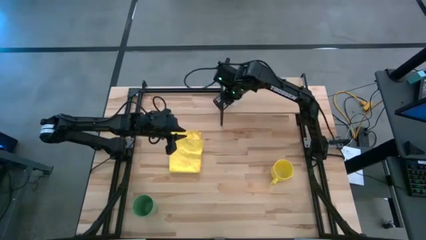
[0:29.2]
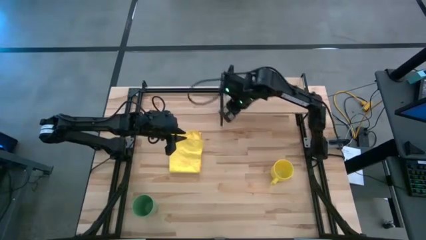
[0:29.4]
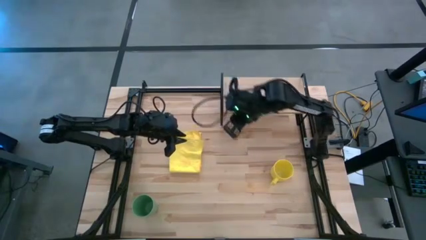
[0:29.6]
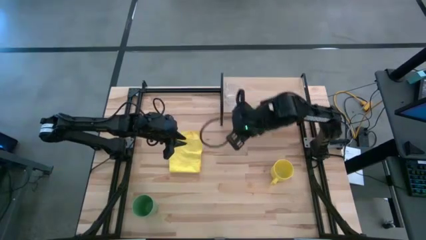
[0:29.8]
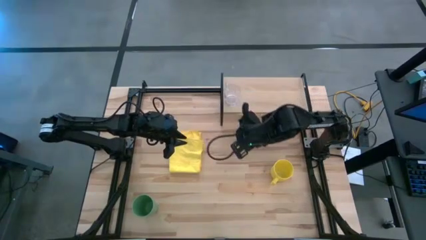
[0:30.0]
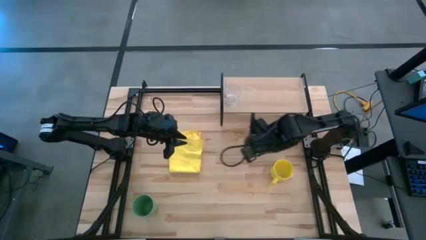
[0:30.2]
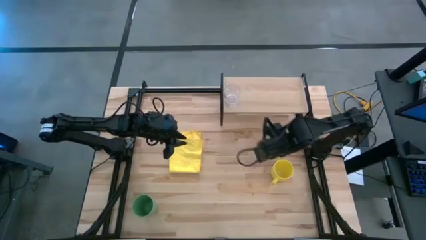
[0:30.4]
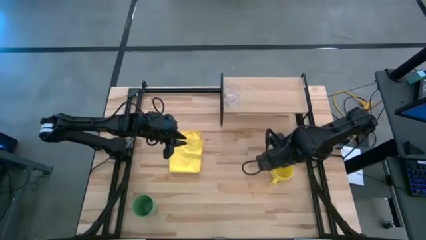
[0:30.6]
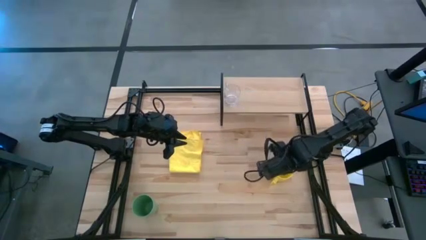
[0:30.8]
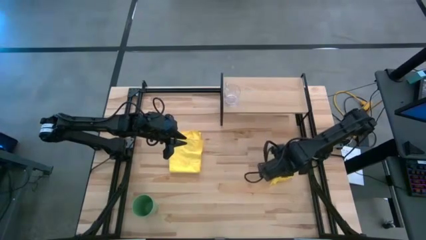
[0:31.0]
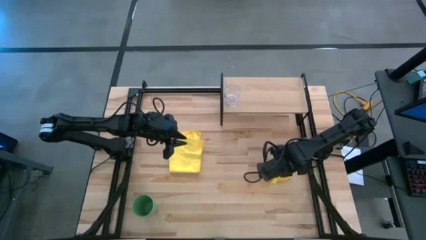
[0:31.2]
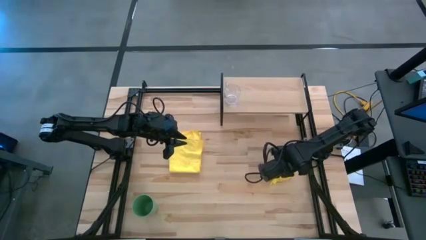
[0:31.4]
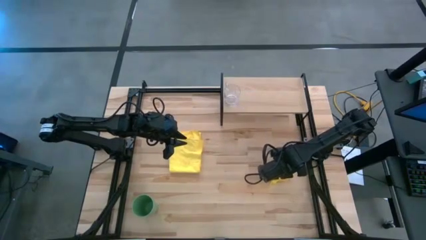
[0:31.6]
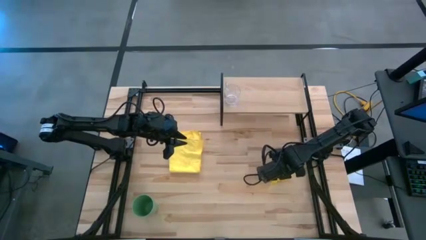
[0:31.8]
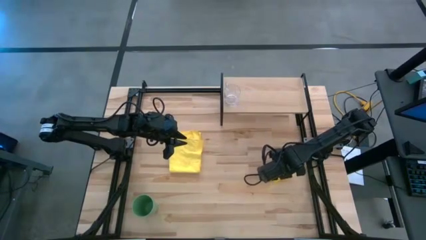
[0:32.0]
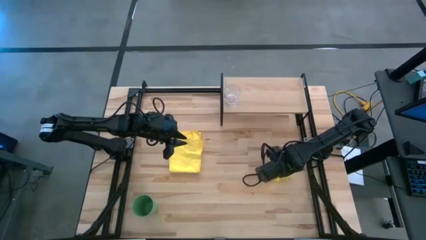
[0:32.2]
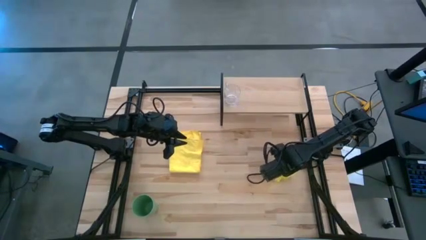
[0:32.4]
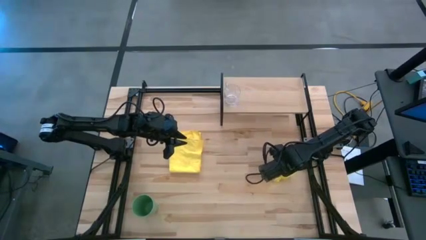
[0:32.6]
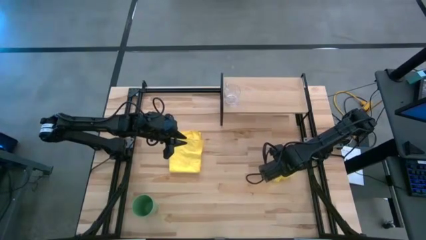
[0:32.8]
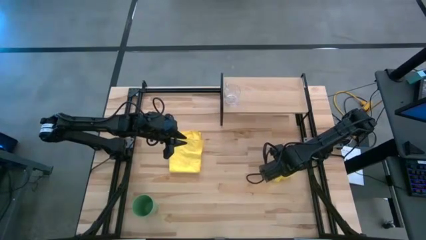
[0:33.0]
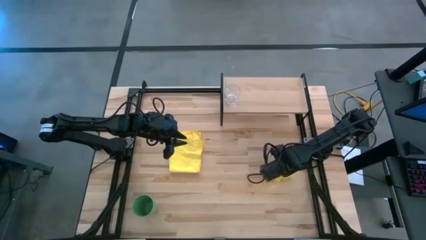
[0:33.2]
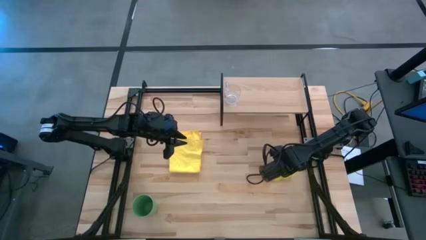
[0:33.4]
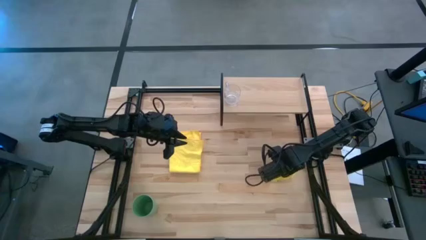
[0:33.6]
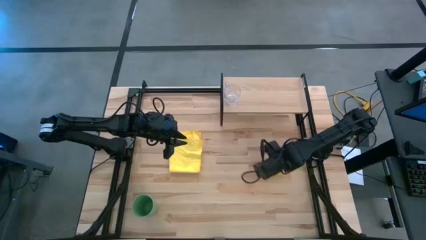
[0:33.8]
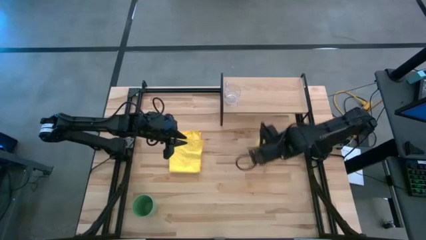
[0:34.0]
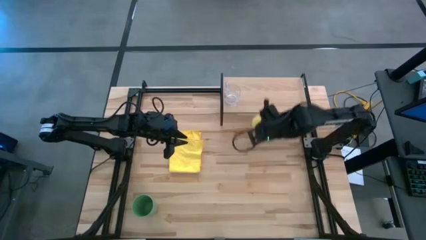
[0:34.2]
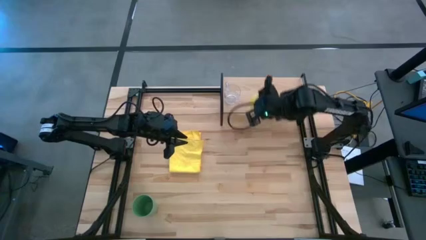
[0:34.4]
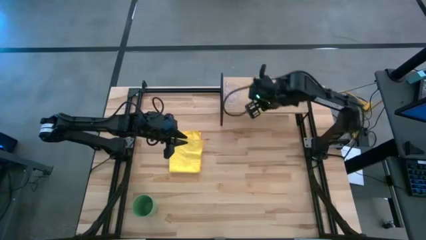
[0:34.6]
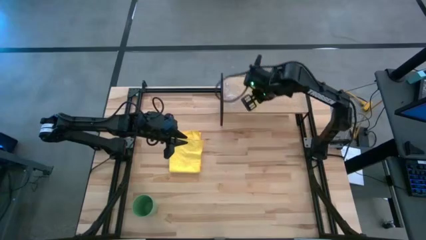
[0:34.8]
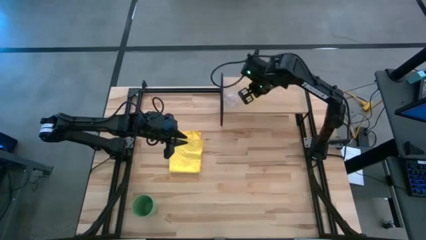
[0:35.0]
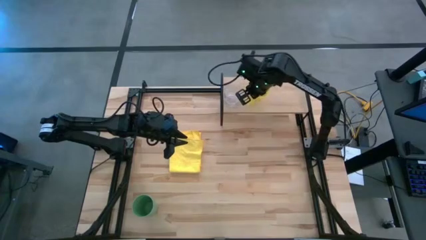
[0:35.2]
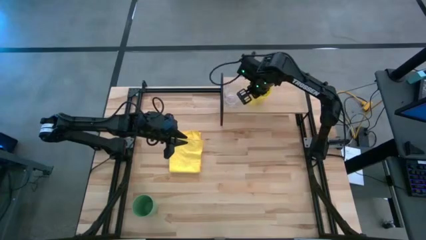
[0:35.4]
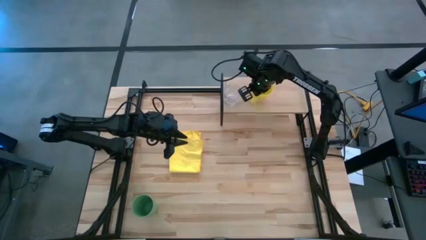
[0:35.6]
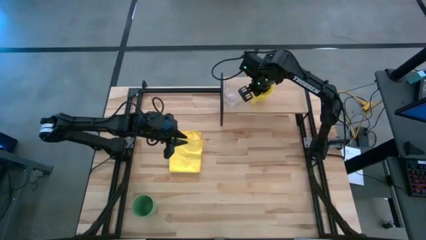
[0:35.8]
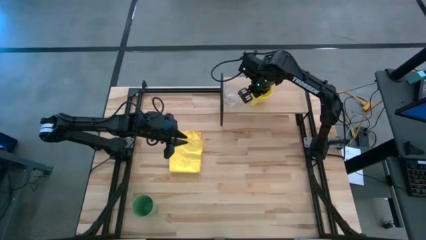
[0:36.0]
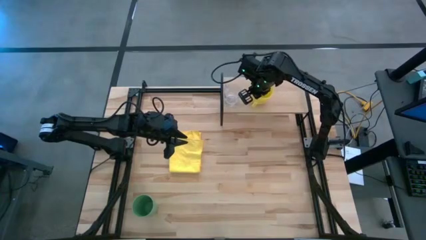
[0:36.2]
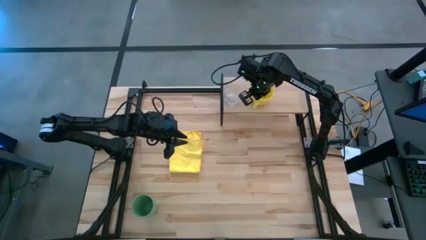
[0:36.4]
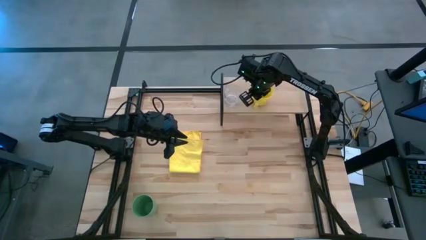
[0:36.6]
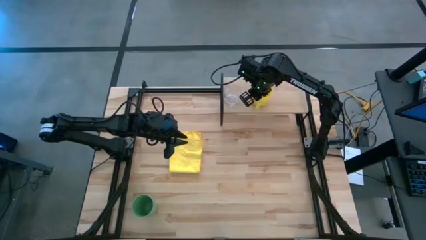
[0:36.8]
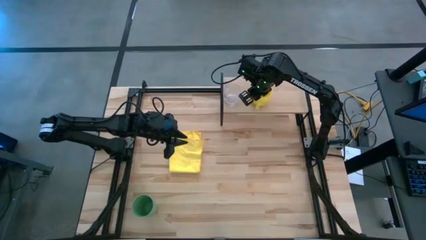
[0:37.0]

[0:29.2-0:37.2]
Task: Stack small to large cups/mugs on shelf
Put the yellow mug on the shelf

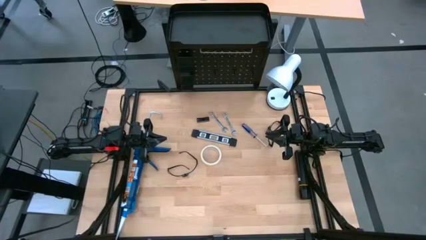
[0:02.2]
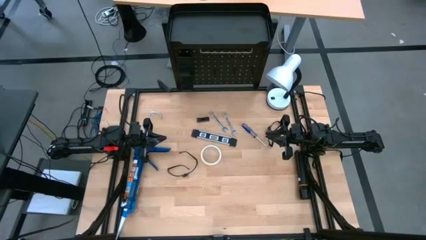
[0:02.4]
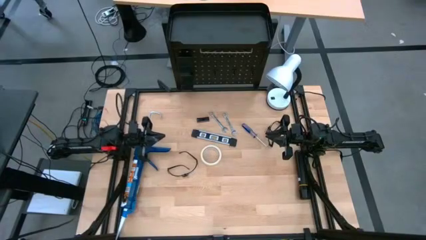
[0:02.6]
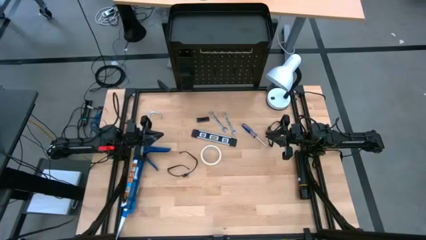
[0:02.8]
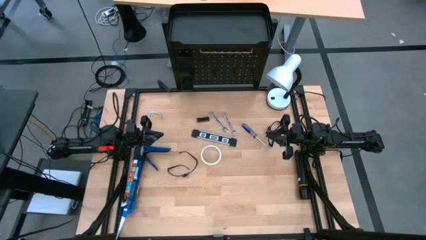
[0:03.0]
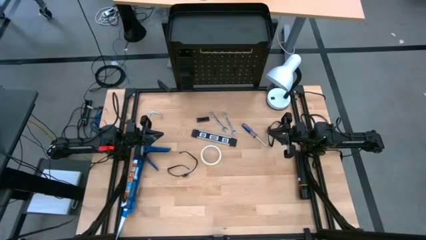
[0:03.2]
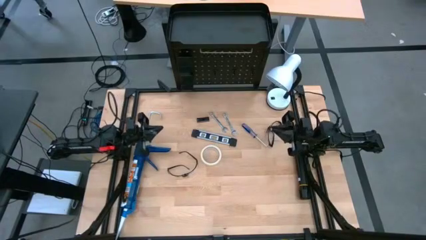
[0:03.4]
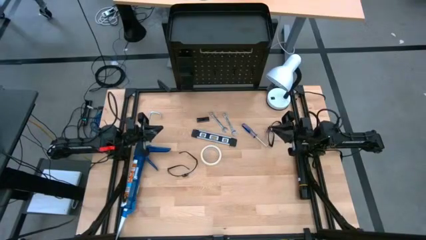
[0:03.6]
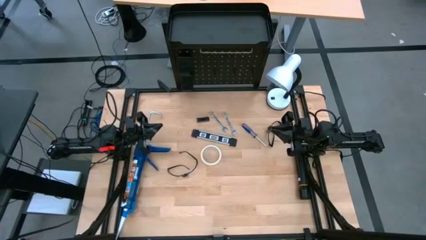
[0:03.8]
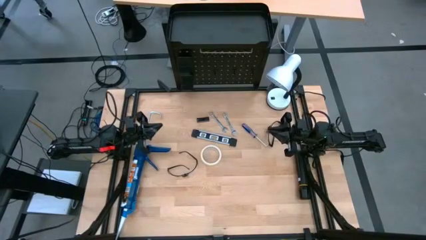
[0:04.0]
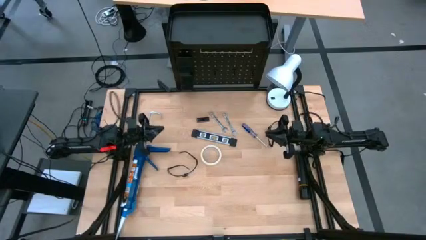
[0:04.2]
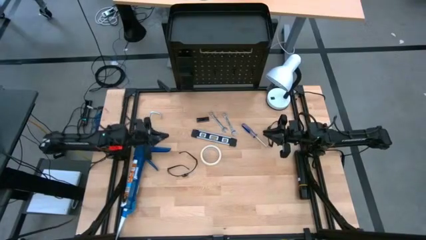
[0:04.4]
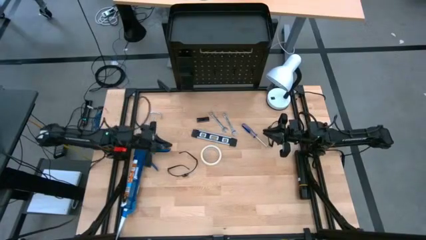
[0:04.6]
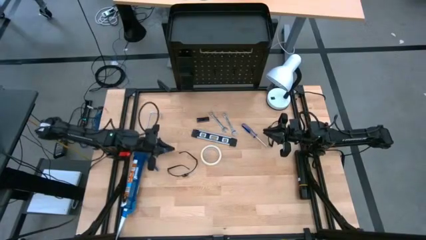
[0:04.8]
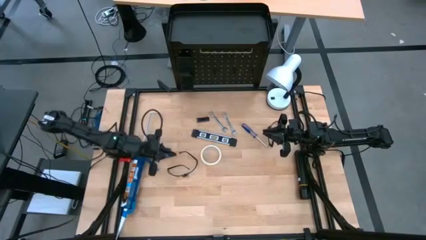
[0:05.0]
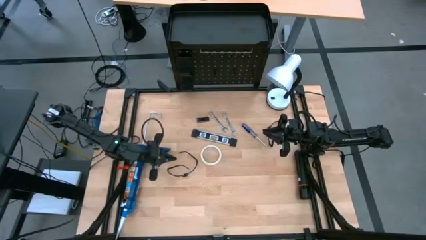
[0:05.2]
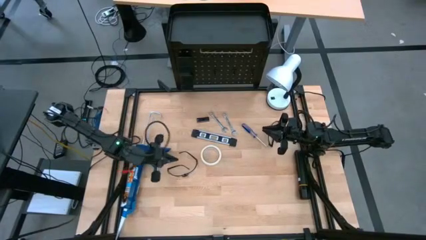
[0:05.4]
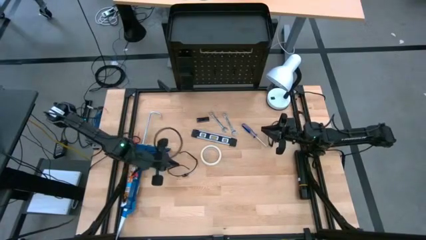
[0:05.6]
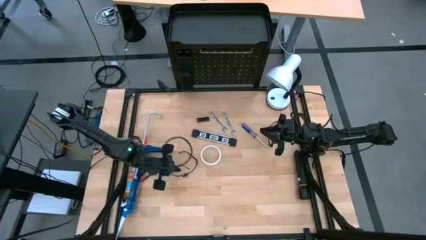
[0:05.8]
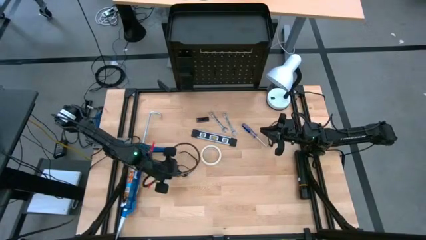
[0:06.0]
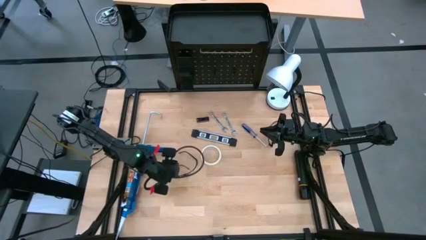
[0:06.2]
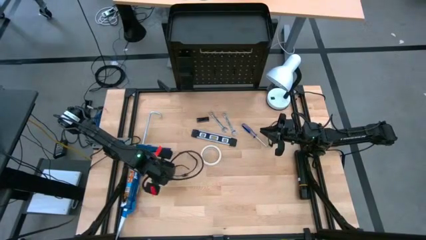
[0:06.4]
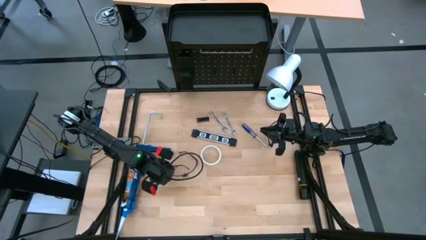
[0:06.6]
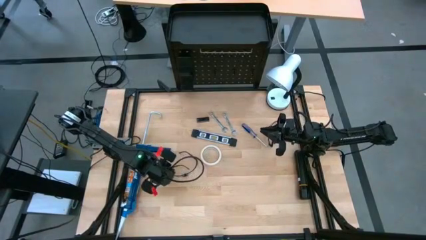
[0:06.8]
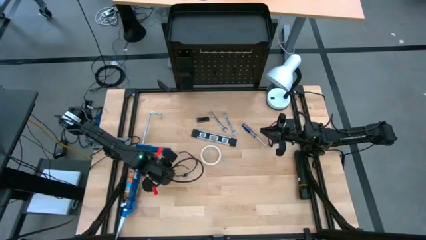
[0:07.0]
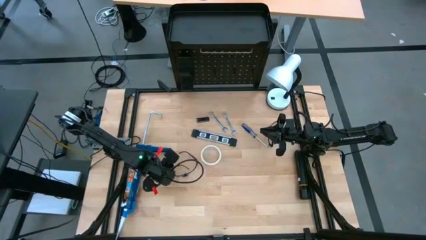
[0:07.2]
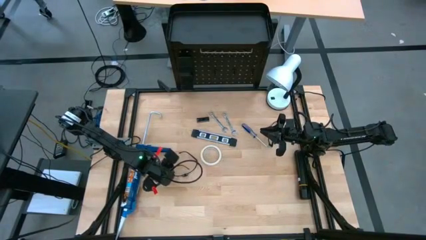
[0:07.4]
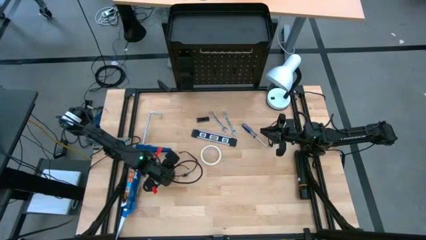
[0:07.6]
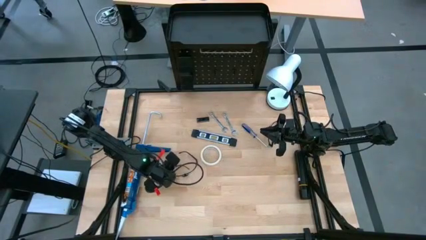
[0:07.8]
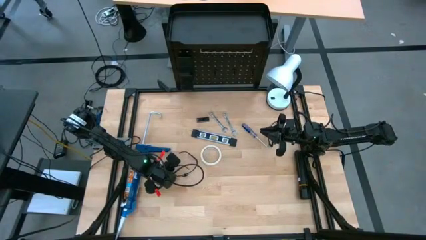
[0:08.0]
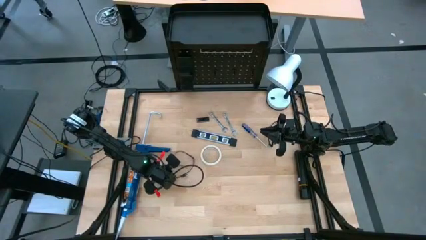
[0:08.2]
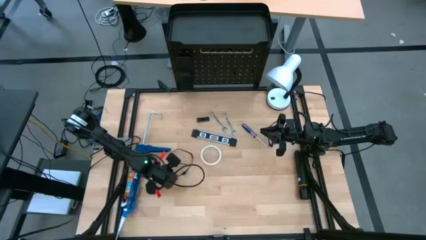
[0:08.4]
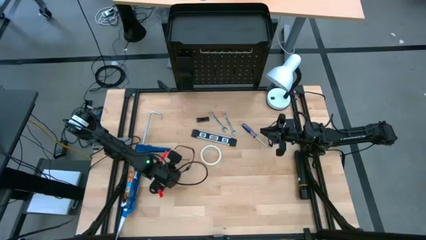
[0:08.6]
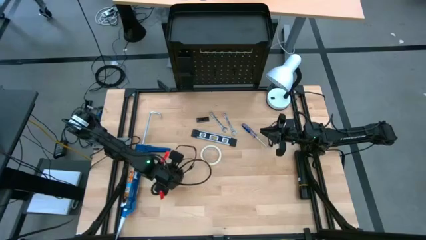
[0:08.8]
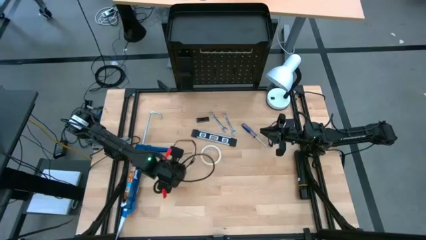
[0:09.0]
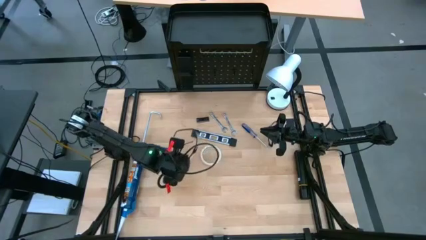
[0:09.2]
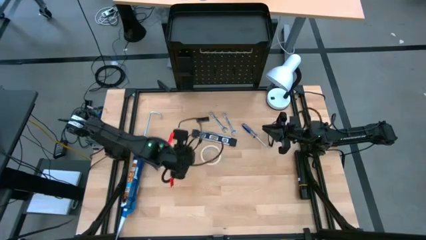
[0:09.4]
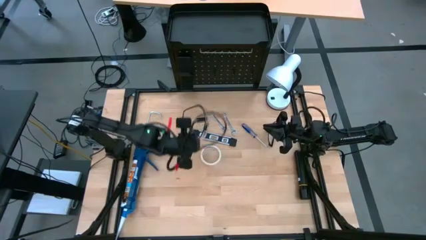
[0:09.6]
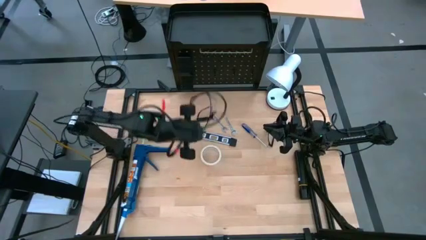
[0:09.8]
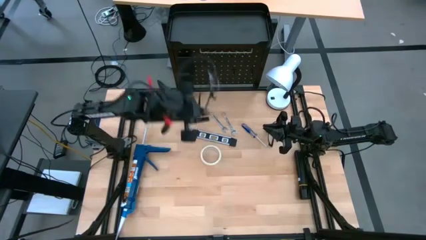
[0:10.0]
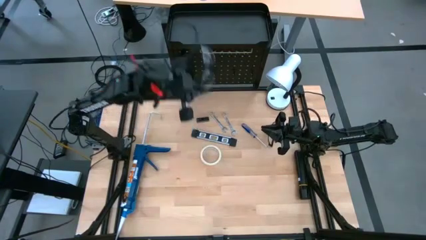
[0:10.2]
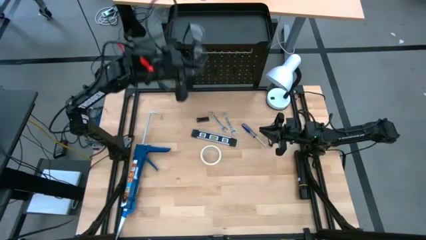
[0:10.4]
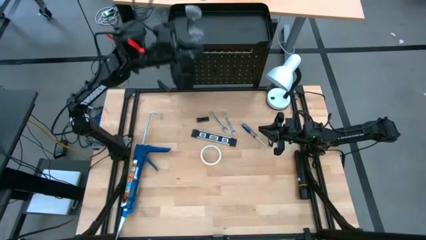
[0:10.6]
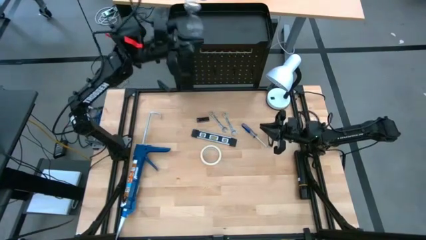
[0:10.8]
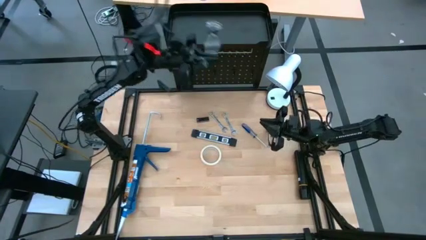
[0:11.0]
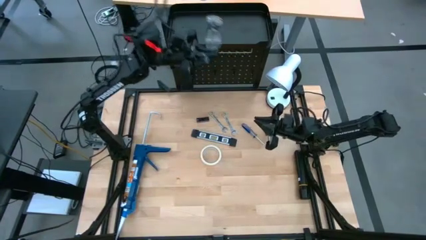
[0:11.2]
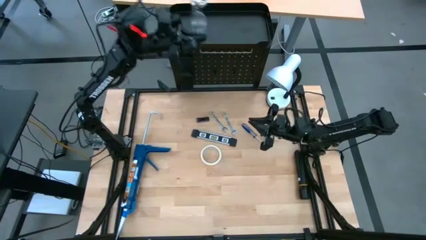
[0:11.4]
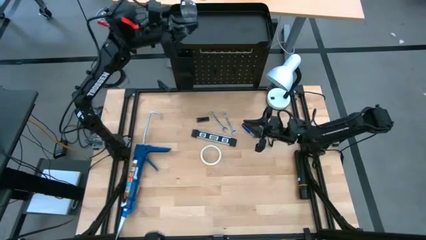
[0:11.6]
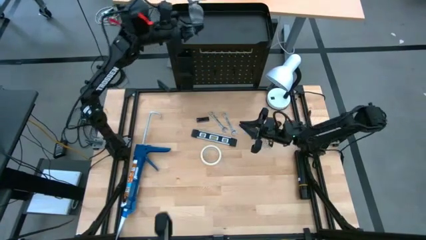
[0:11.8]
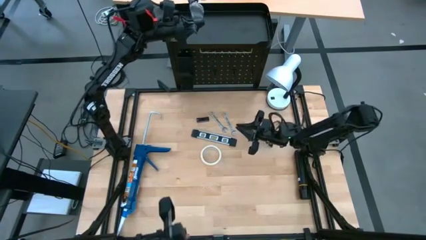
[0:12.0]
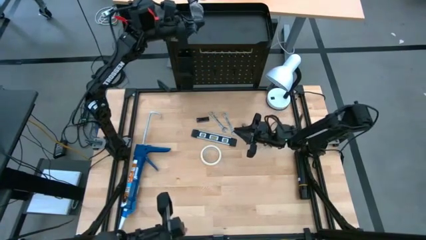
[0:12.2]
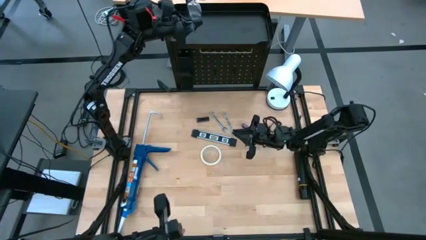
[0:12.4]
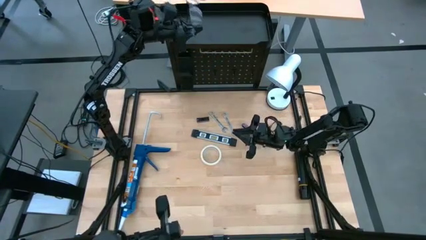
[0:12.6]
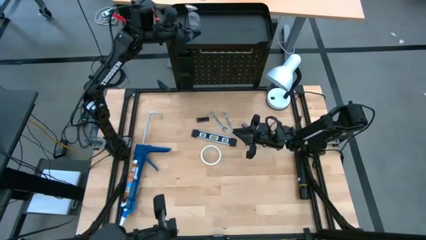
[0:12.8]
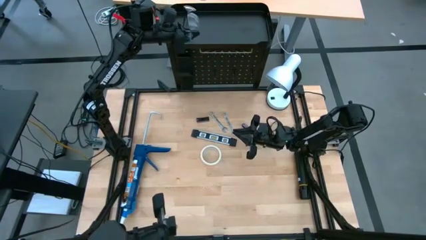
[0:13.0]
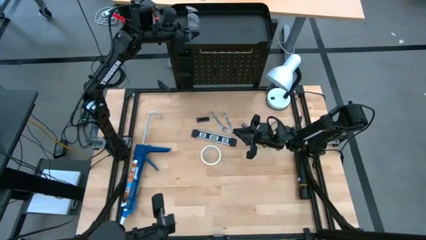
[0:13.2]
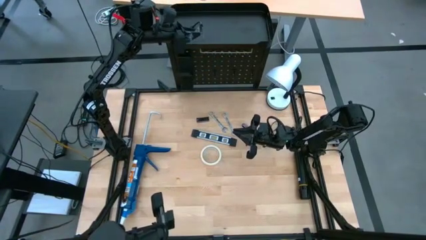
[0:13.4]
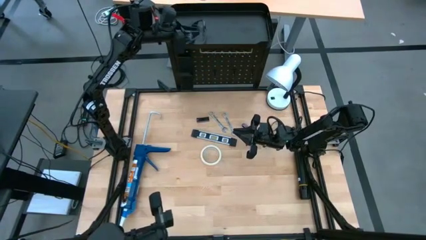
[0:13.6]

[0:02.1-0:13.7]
Task: Hang tools onto peg board
Put the left safety glasses on top of the pegboard
